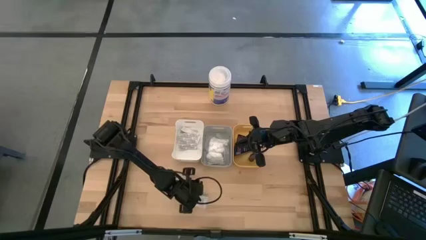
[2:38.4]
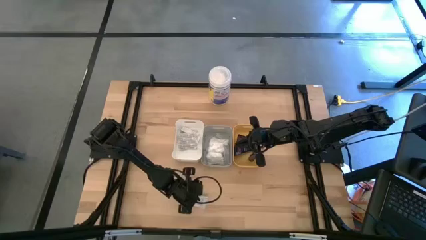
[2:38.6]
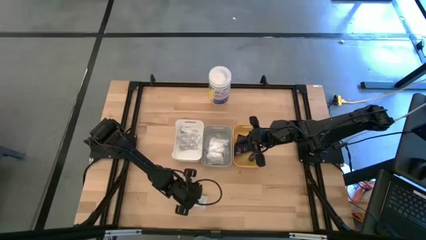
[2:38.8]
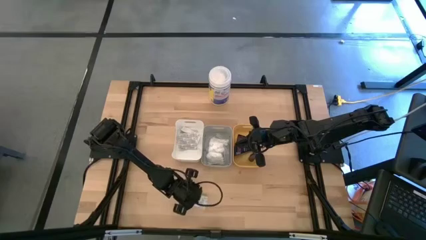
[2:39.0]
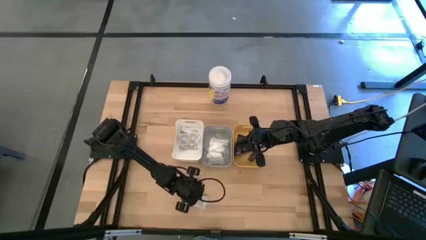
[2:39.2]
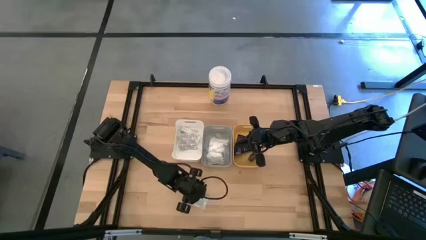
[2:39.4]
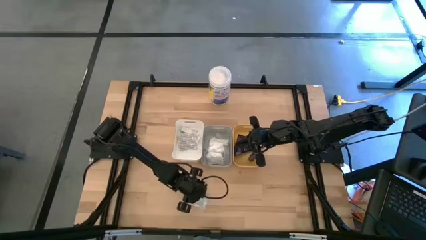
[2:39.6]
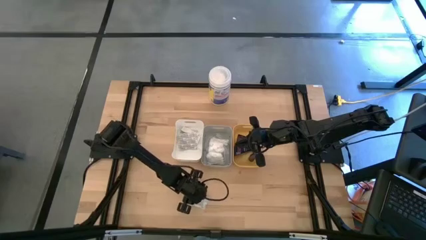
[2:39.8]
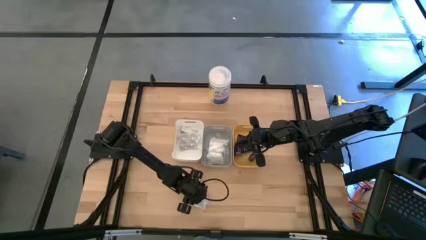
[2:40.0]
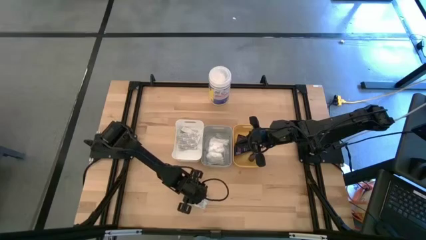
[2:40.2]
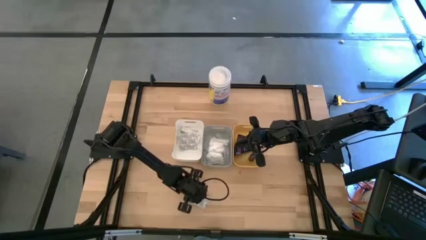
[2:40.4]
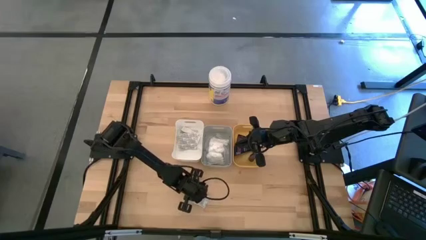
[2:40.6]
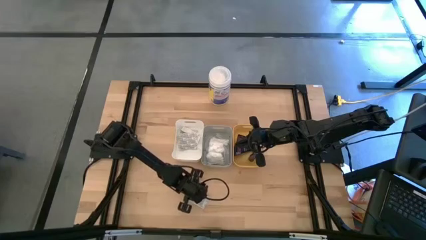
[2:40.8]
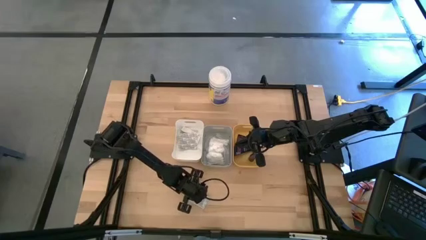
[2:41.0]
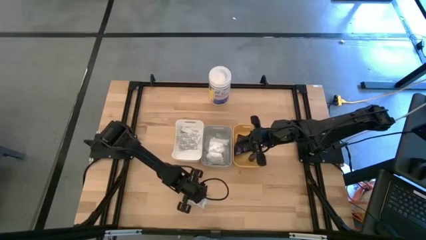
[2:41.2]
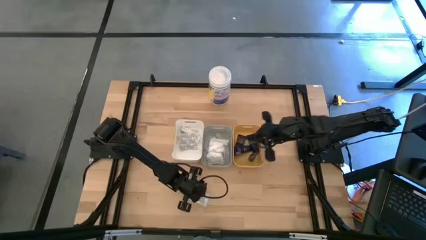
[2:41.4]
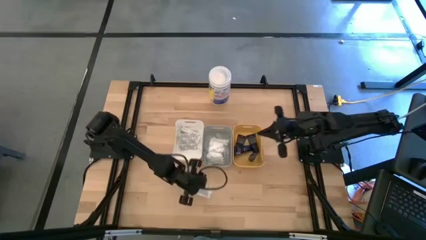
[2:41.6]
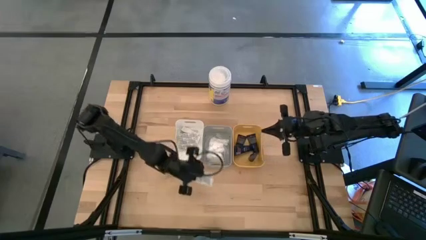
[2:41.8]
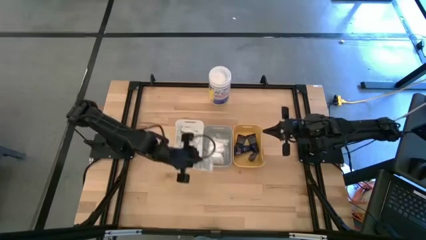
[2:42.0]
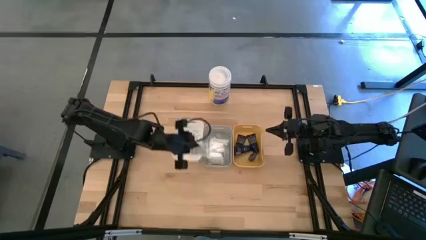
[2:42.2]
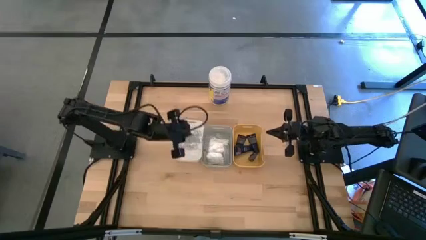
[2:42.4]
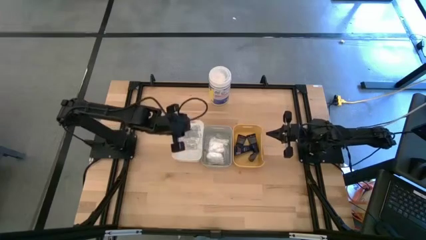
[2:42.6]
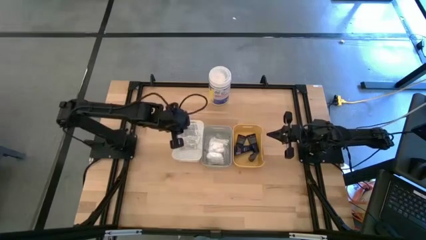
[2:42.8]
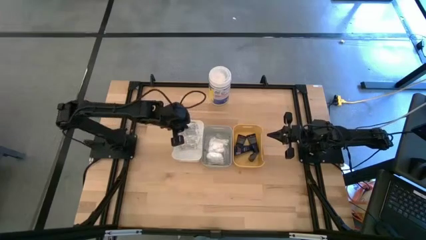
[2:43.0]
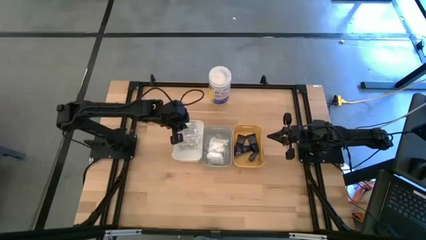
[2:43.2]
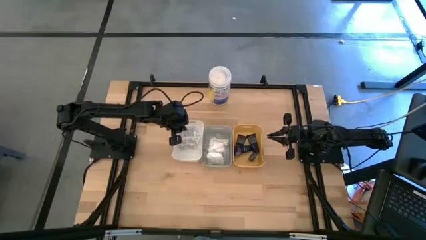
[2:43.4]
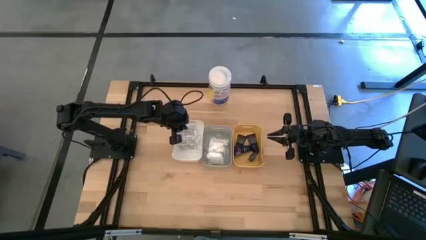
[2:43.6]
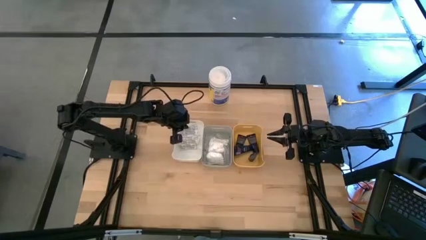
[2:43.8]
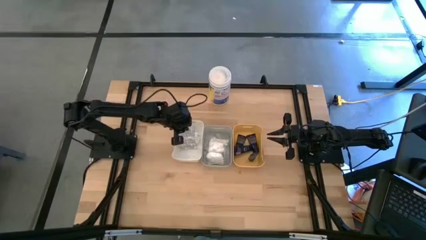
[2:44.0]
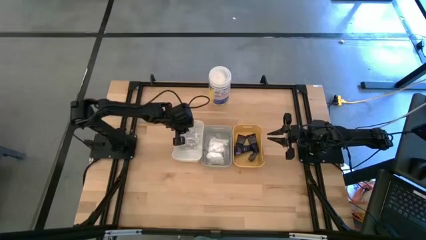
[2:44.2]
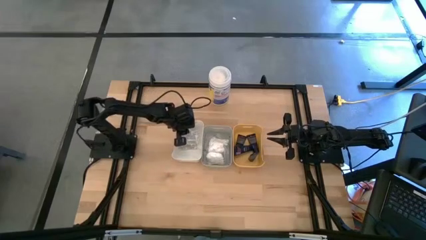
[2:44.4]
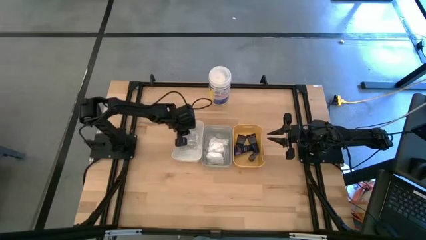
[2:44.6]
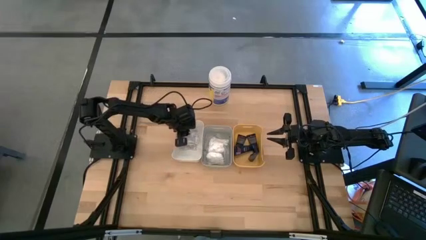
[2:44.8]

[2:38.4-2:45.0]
Task: Pick & Place Travel size toiletries
Put the white band-aid into the white bin

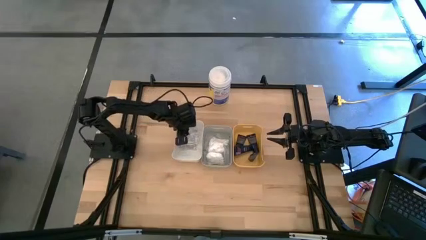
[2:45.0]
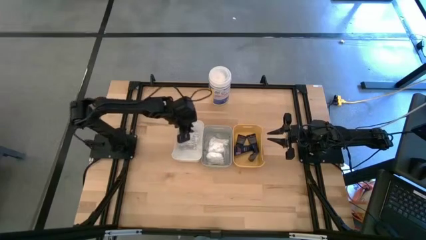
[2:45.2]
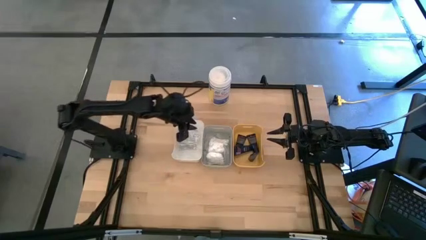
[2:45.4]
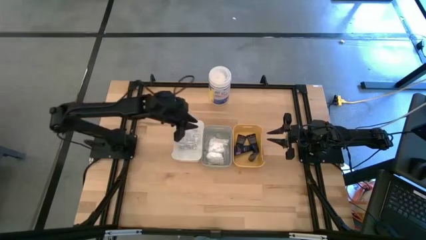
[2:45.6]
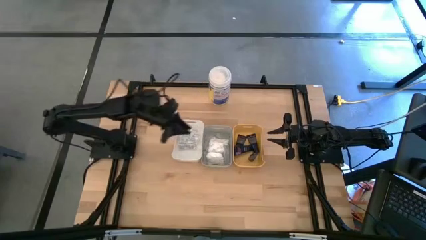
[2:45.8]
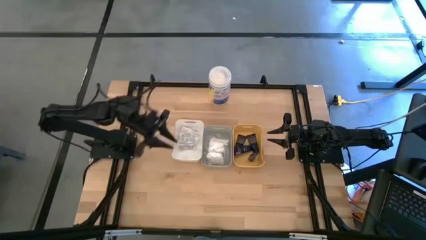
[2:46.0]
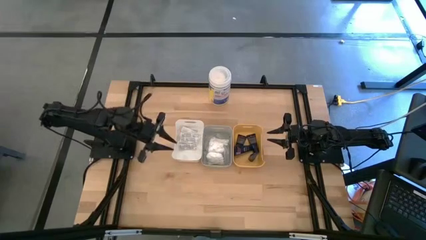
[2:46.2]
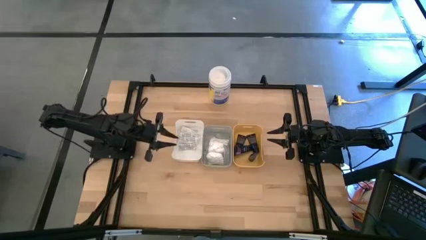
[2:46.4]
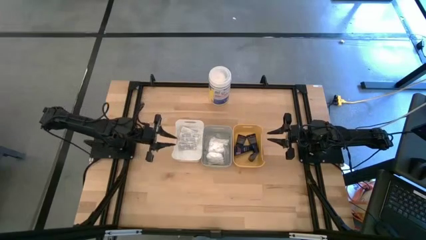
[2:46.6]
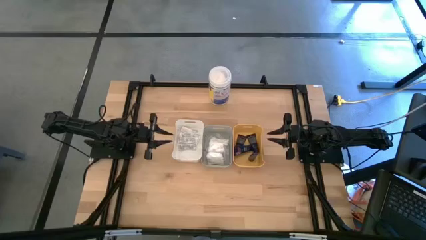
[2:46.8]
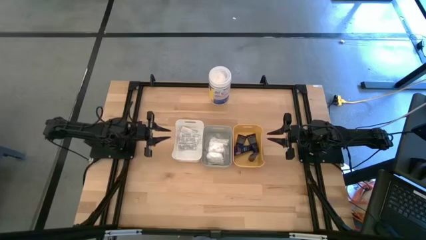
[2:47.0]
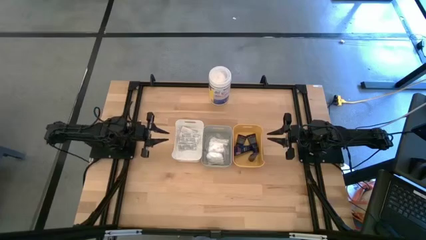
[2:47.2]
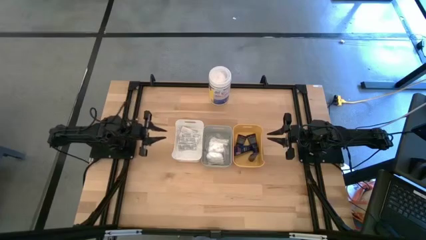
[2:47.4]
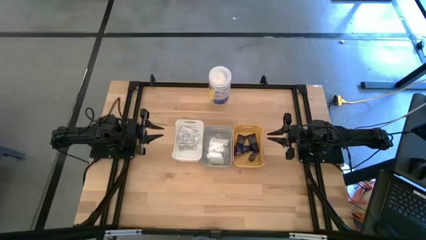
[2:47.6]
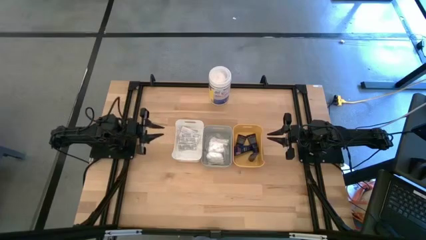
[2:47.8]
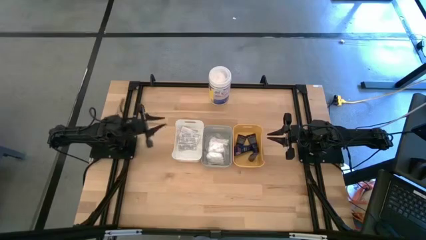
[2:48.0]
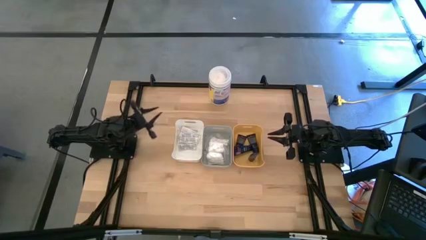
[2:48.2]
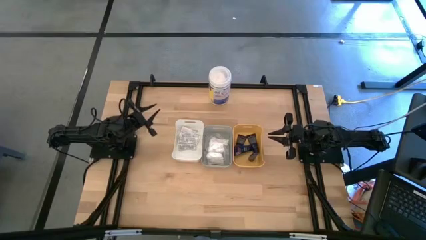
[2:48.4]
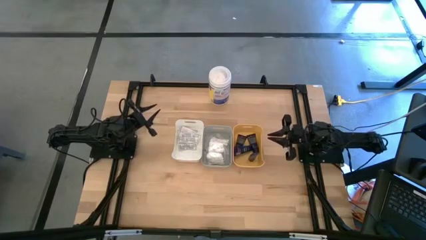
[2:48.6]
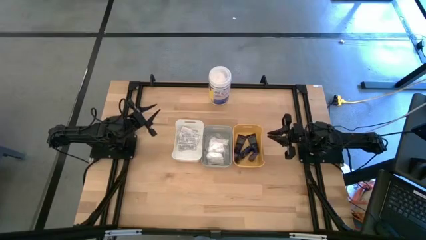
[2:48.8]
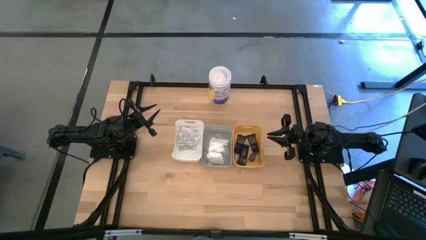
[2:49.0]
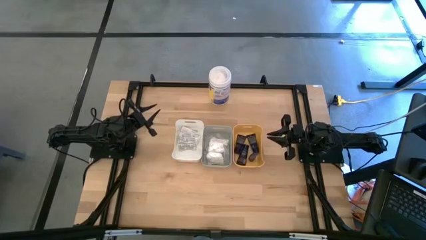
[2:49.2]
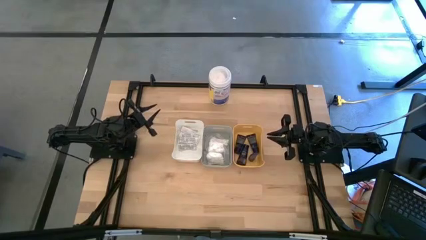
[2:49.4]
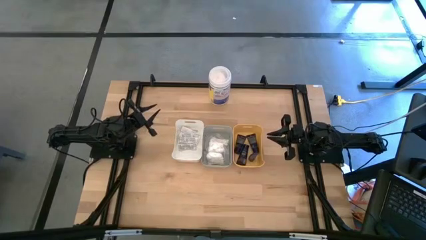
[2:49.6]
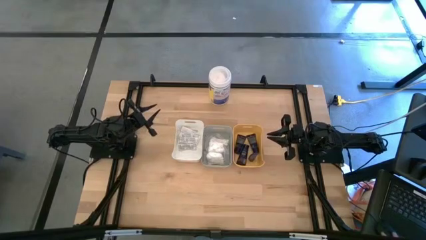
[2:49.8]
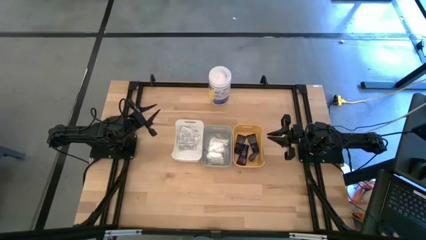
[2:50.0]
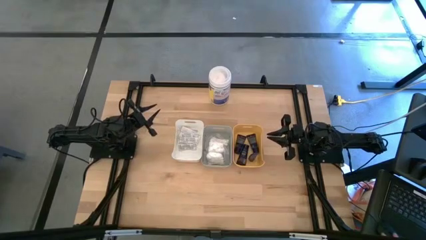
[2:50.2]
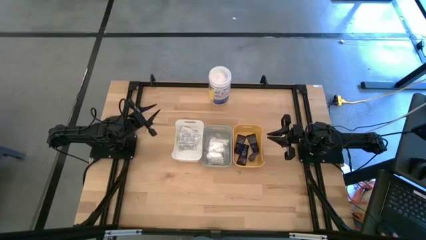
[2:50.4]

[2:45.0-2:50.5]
Return to Home Position

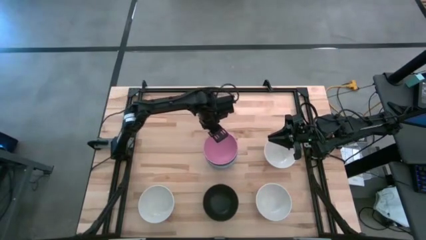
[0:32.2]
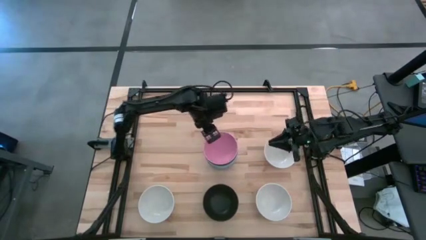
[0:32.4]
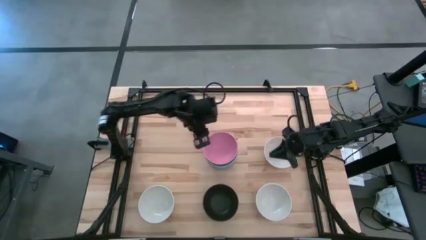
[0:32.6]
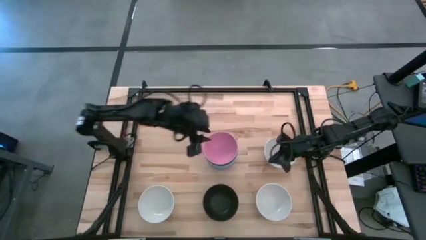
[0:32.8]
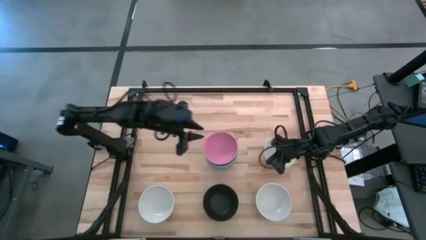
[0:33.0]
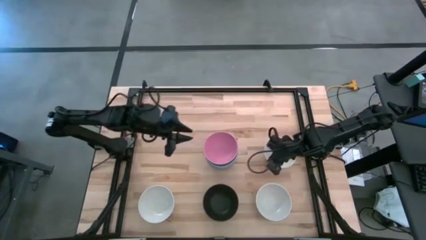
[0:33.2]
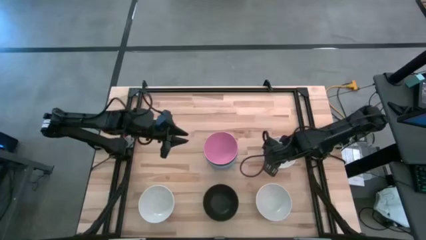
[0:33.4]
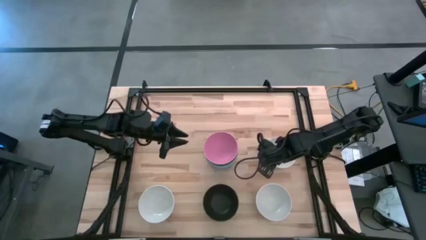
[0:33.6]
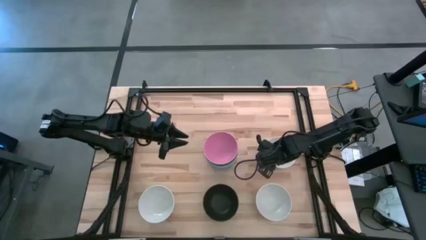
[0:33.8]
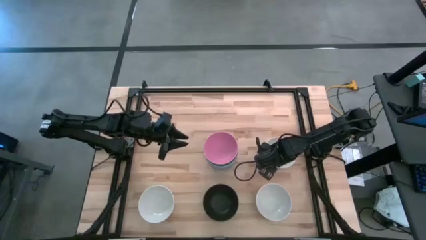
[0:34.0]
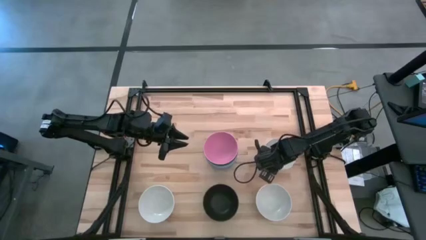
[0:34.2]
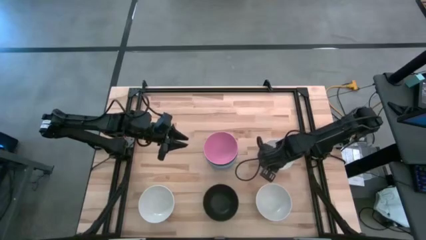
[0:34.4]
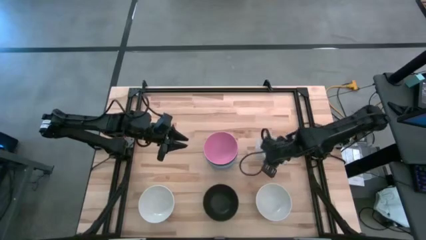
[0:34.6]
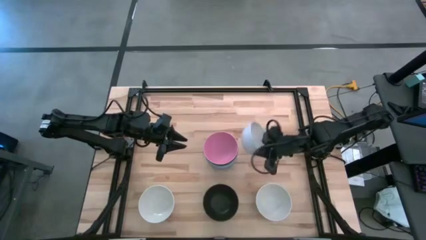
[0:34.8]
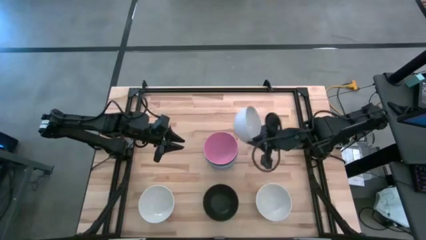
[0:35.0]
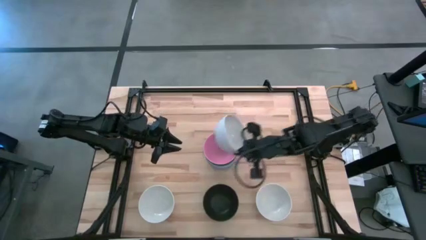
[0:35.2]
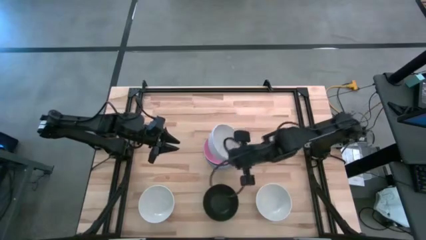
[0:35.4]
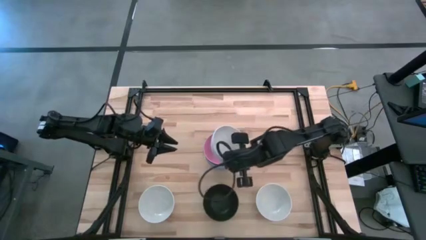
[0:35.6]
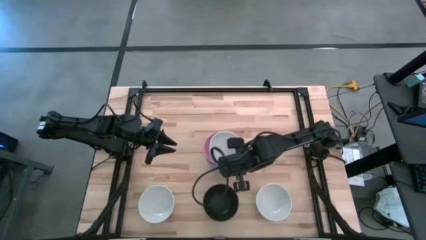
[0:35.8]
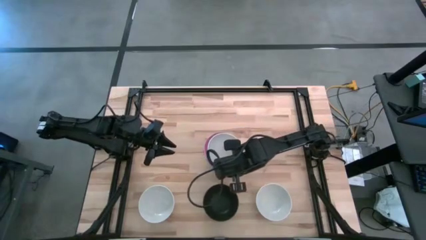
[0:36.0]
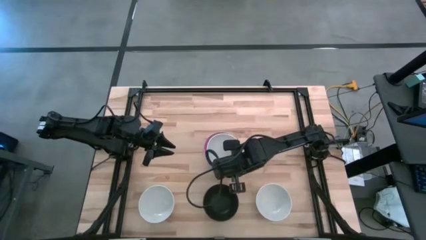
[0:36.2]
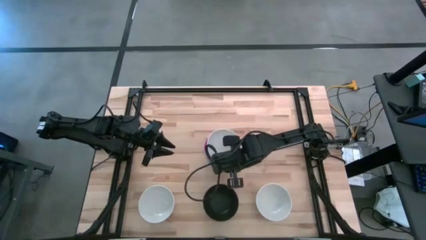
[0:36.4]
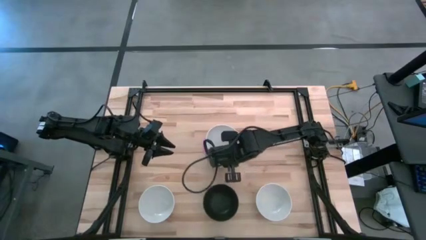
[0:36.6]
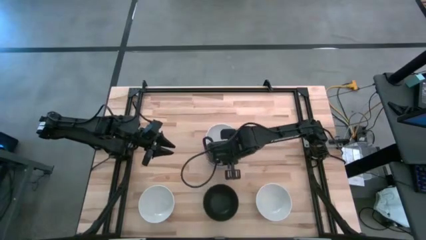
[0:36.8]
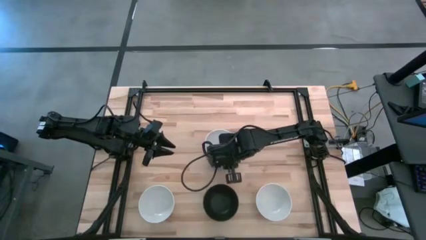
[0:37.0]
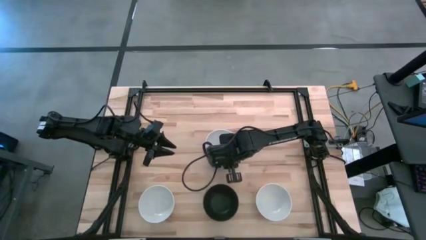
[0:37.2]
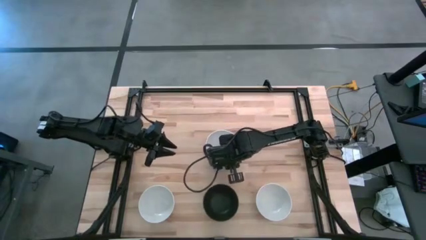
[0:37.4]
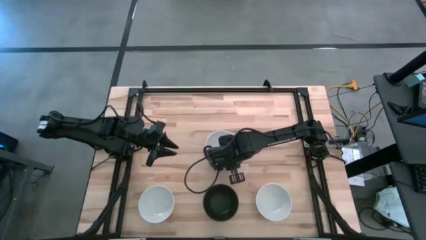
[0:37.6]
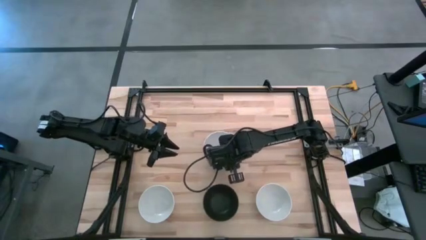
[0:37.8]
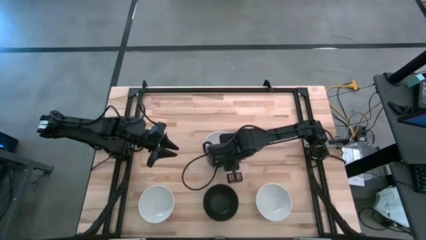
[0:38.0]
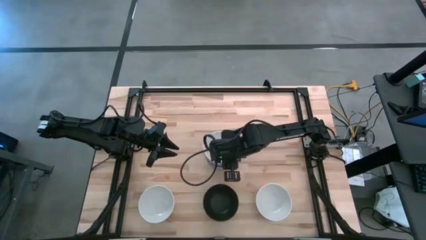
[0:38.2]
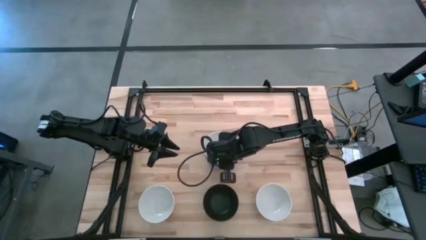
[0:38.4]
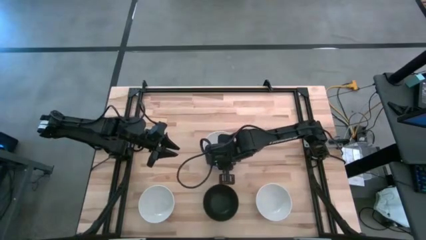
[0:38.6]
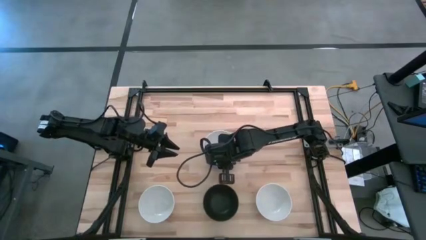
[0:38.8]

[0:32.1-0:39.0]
Task: Nest bowls inside each other
Stack the top white bowl on top of the pink bowl
